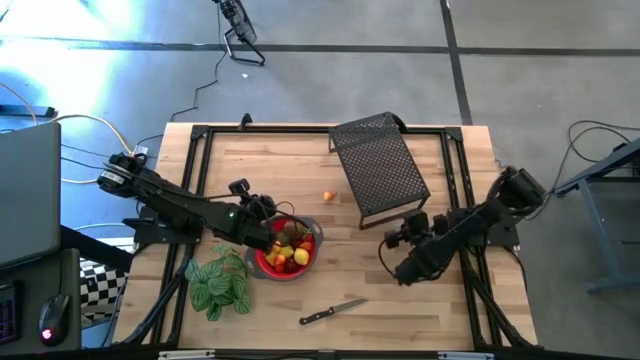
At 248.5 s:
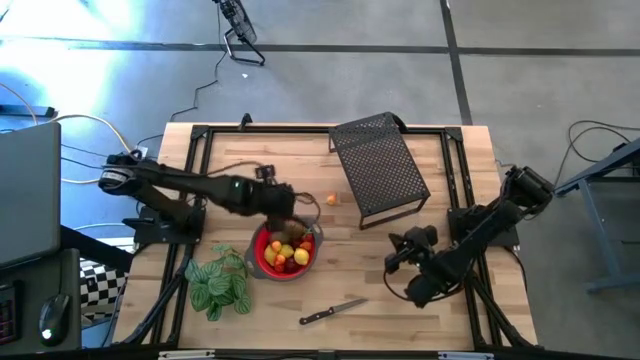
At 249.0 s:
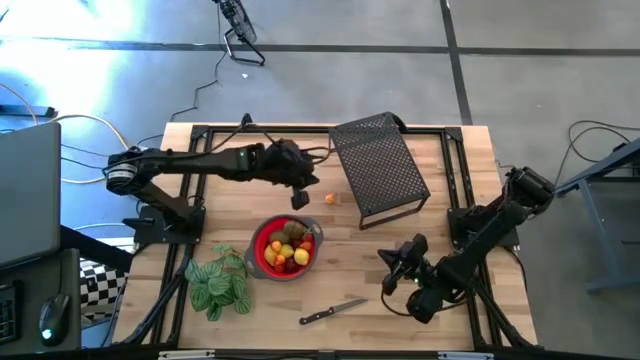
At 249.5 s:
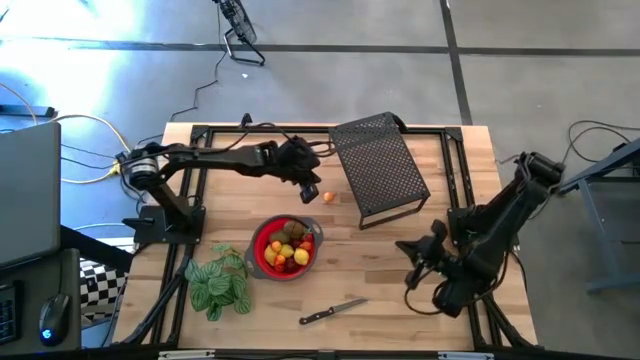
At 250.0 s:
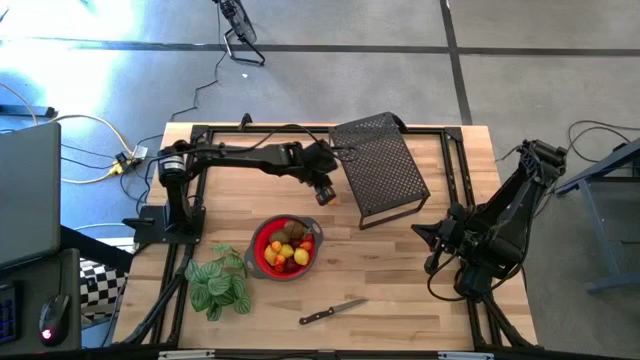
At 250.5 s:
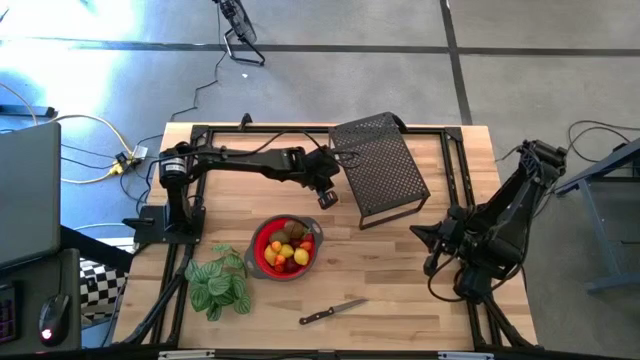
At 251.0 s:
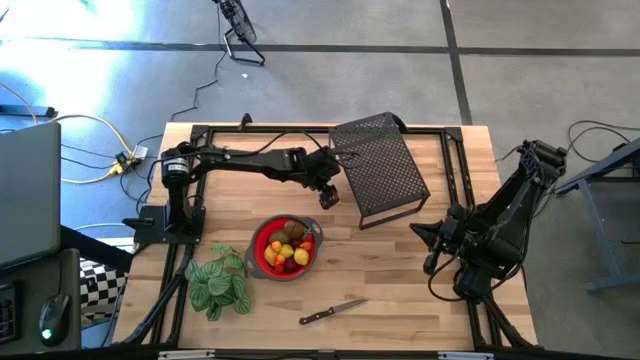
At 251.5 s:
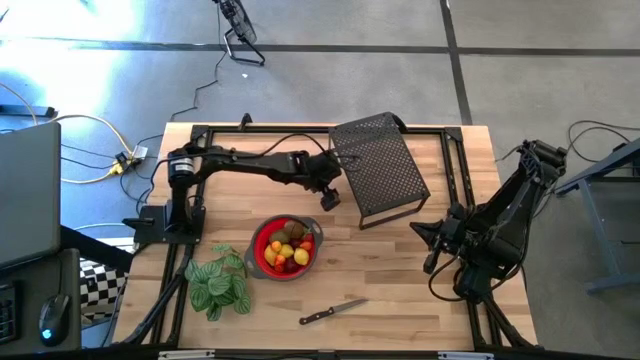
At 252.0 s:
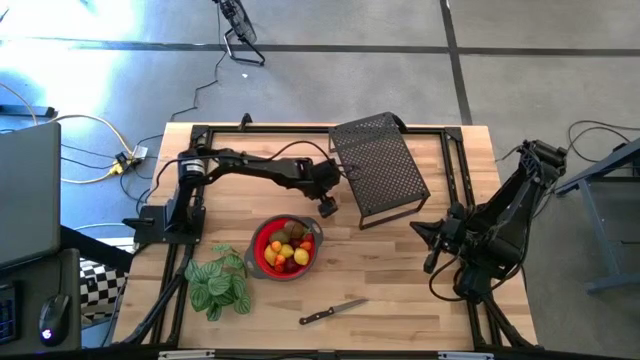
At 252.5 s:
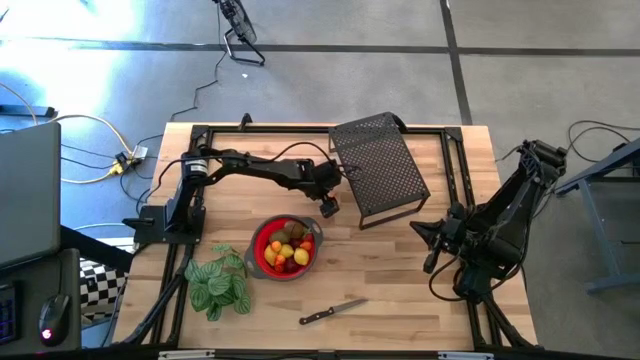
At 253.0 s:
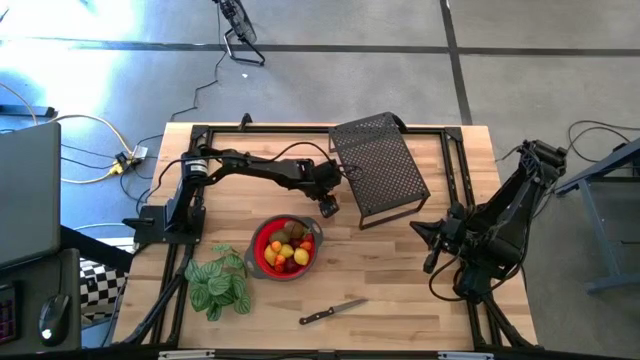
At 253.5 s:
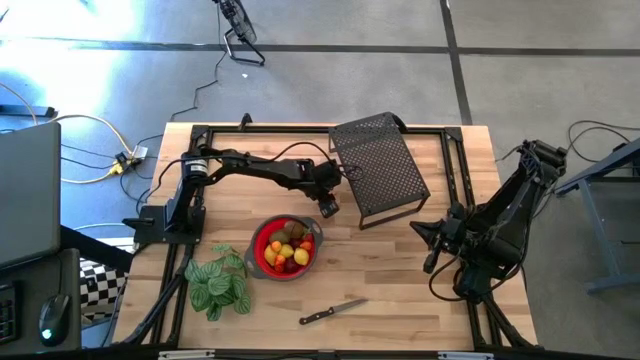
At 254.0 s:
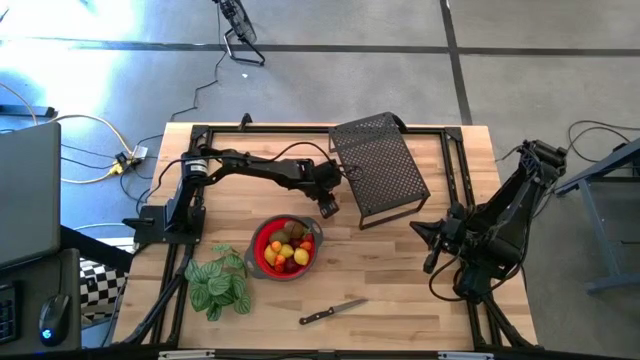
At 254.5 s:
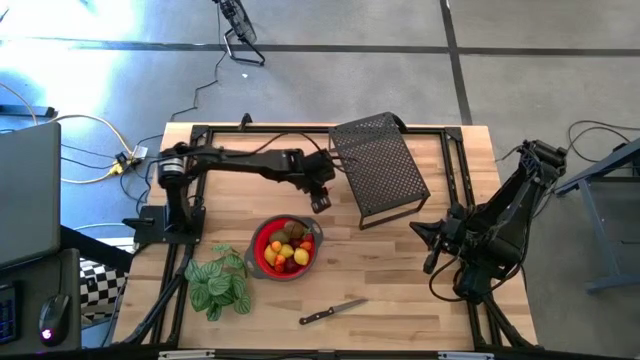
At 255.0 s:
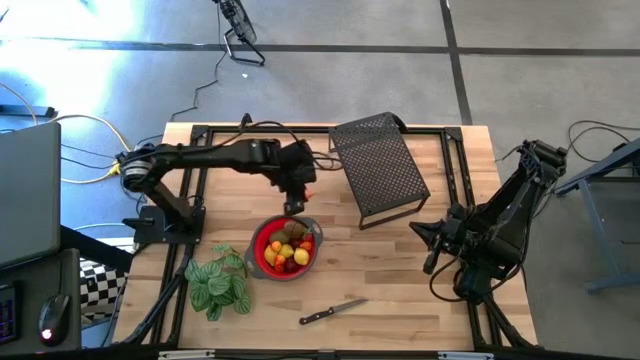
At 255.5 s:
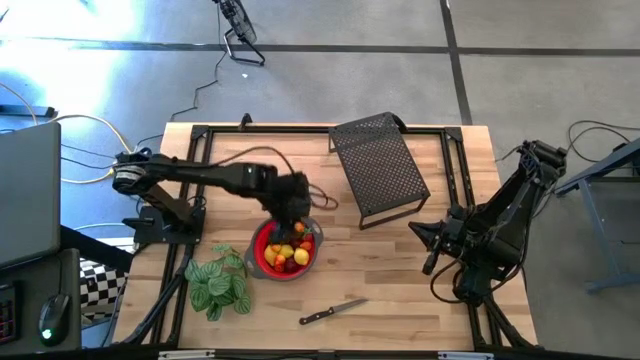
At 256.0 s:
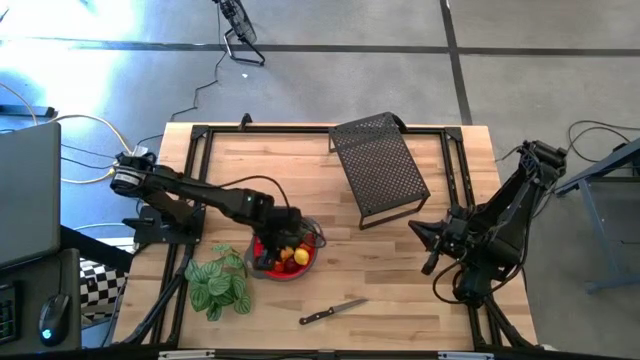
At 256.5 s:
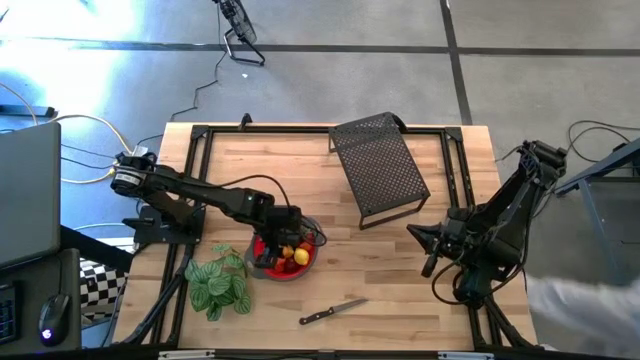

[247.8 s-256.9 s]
Task: Pick & Place Fruit
Put the orange pear into the strainer bowl

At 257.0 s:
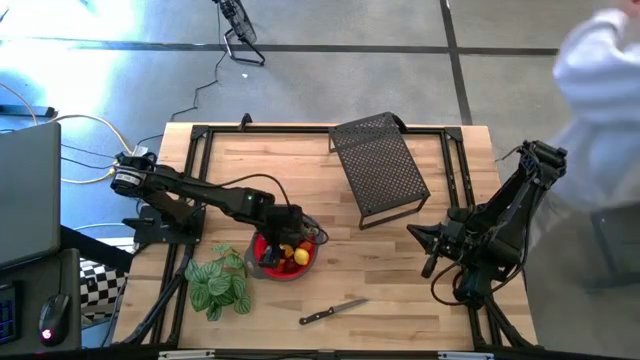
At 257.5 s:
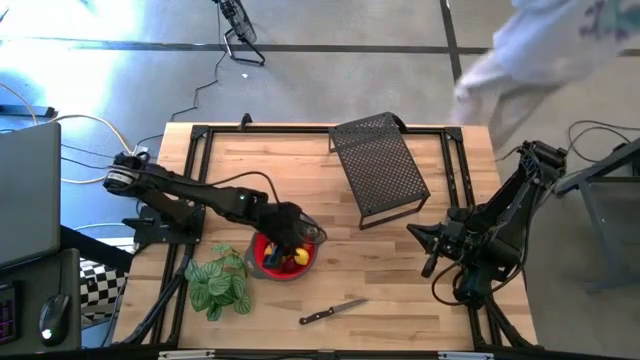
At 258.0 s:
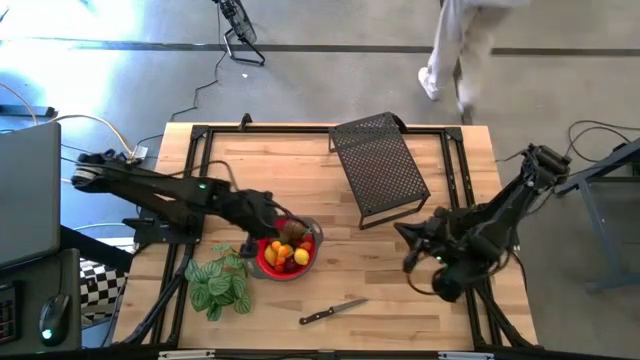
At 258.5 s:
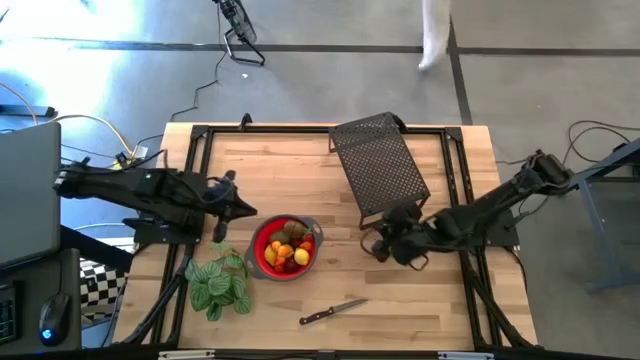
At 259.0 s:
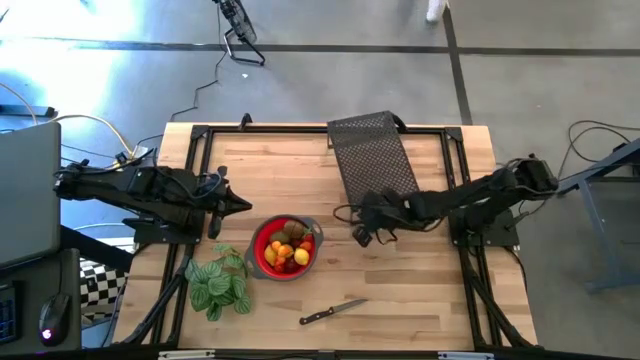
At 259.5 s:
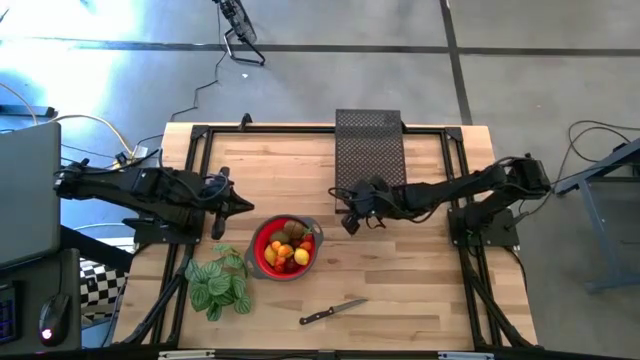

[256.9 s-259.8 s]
Adjust the shelf

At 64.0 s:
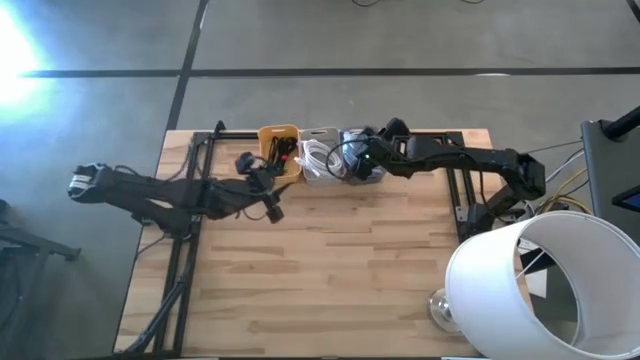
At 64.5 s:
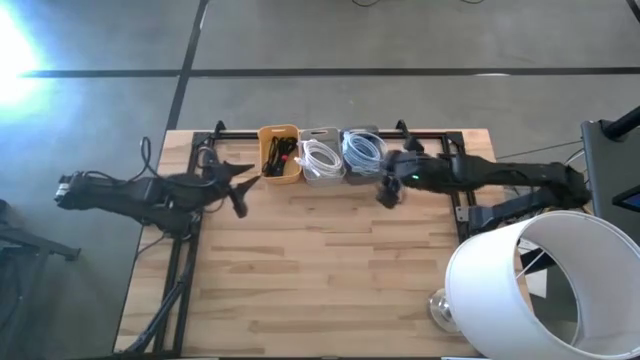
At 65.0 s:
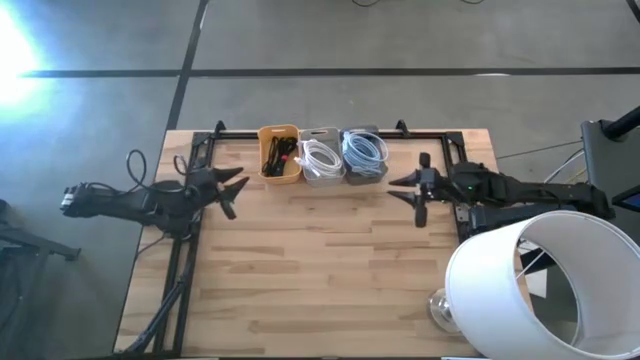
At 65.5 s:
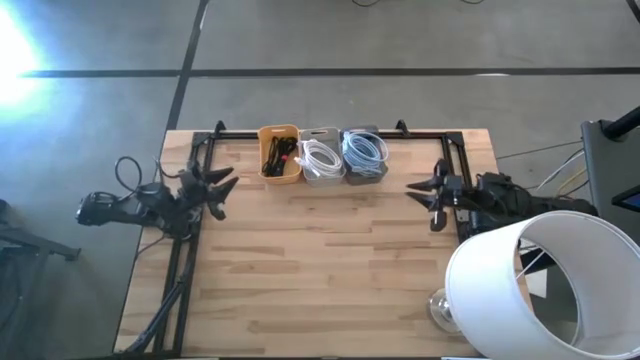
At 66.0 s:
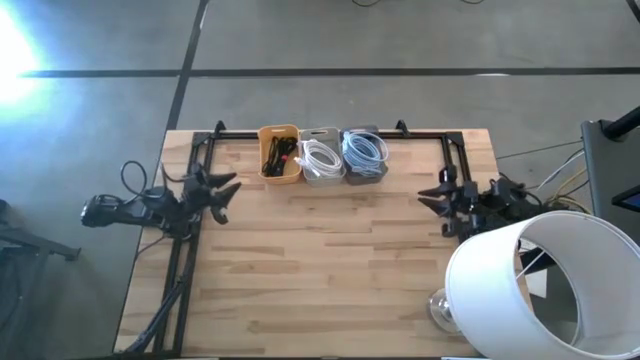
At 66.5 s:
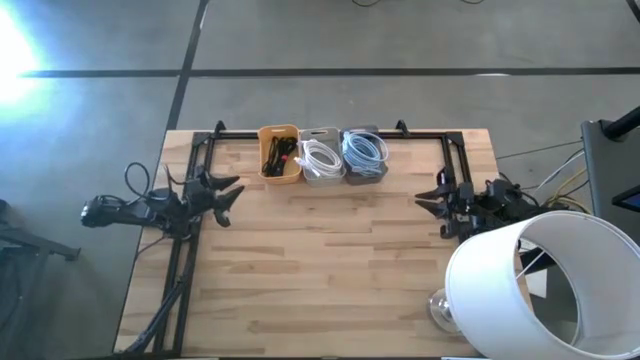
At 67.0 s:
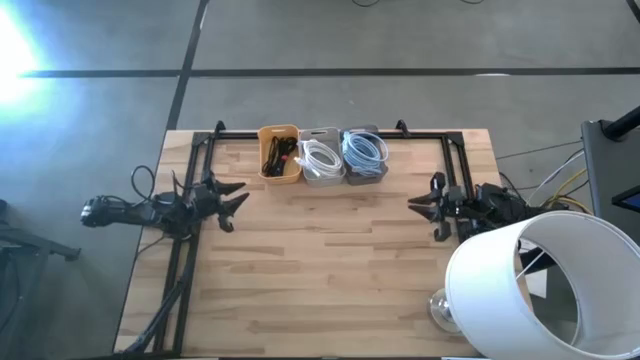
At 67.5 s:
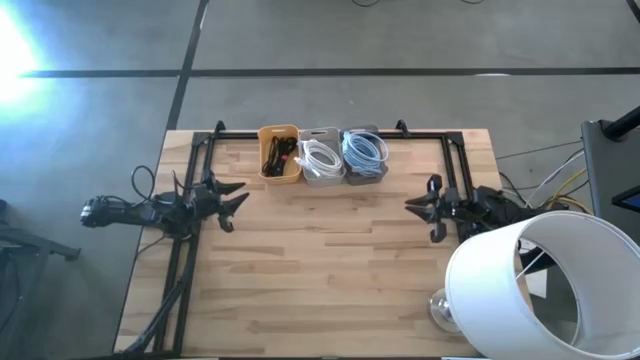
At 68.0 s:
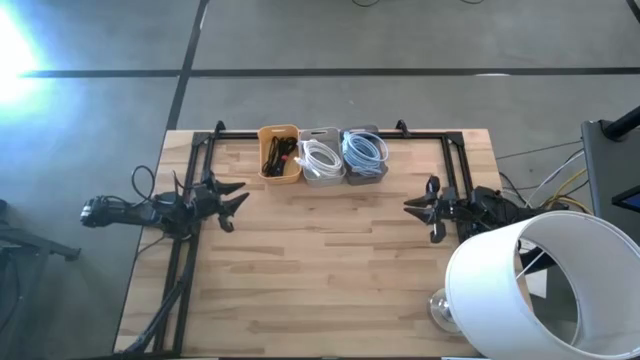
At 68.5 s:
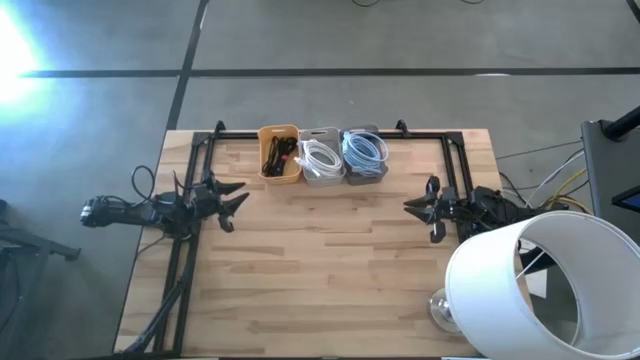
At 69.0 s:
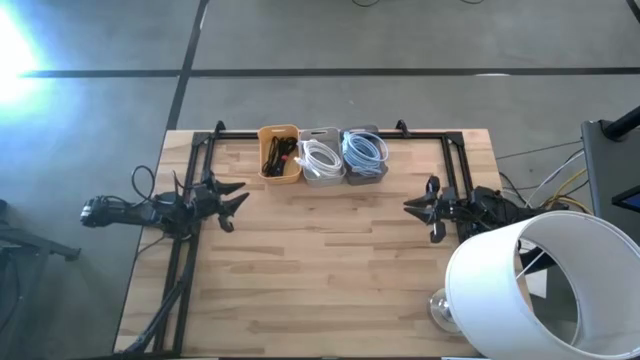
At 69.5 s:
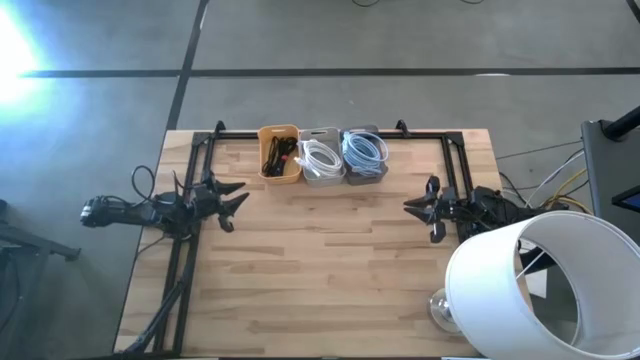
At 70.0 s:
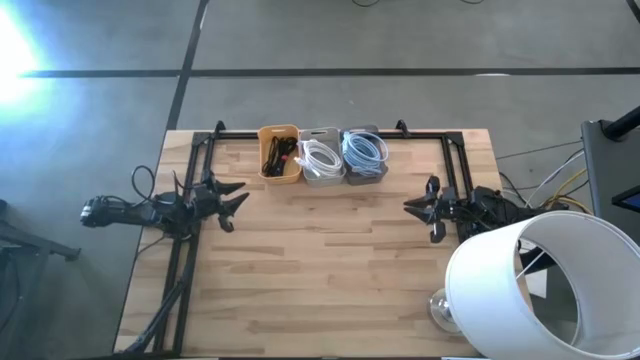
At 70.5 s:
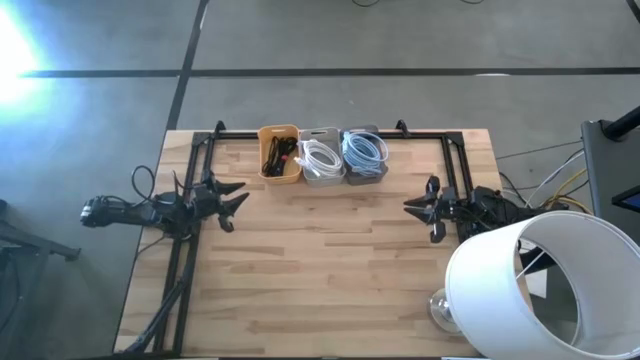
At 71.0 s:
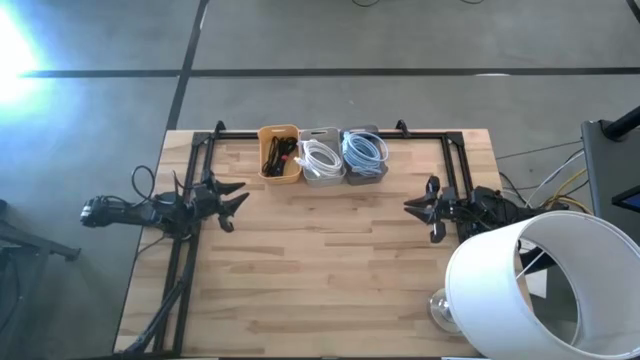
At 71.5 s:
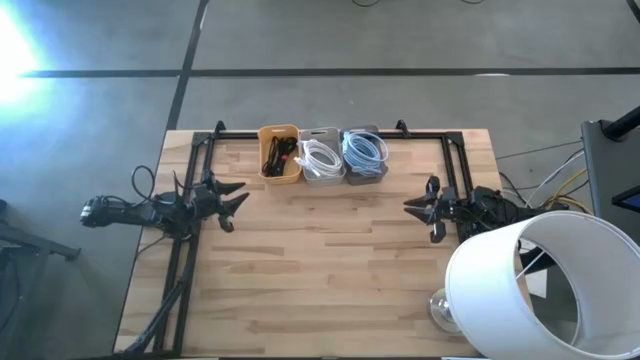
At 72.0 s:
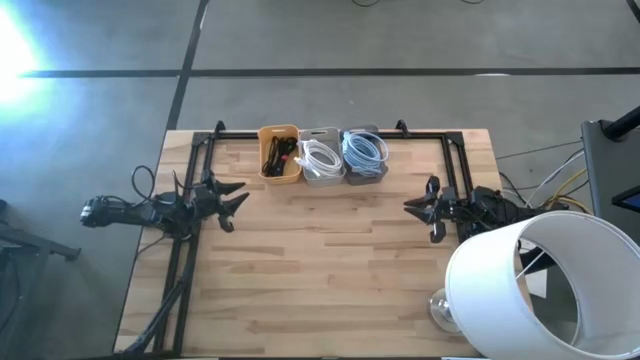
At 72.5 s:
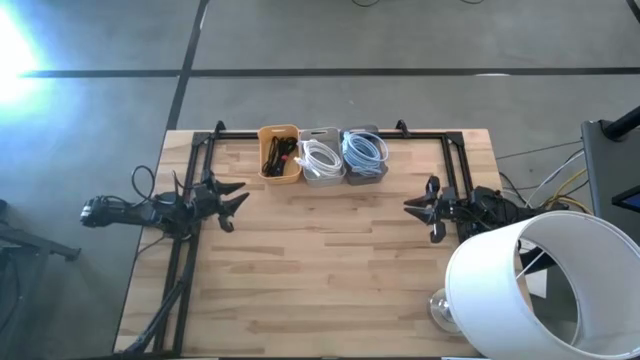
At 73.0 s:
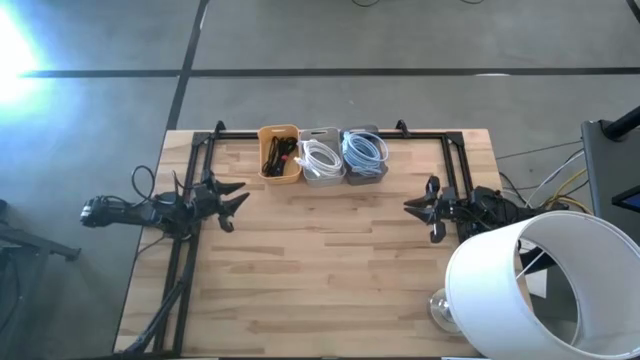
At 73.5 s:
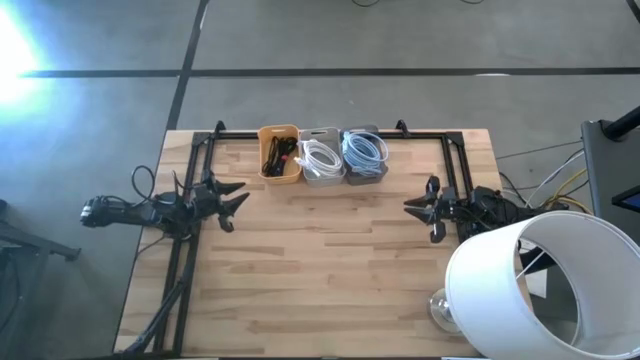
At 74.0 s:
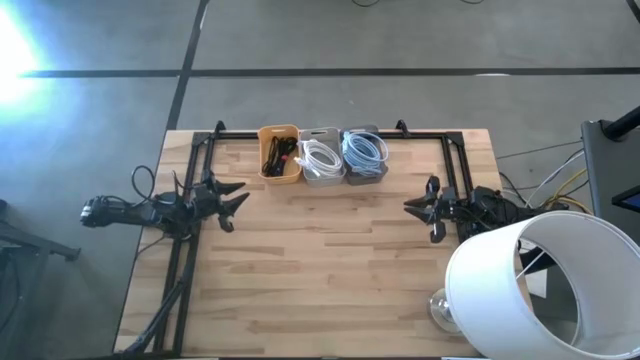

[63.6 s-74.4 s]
Task: Pick & Place USB Port
Return to Home Position
